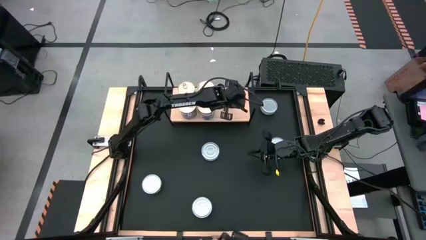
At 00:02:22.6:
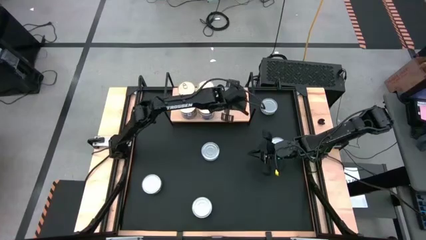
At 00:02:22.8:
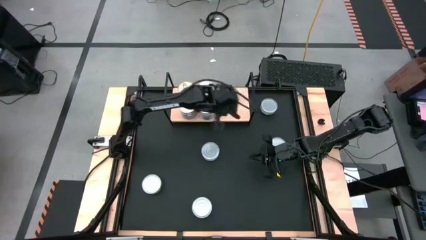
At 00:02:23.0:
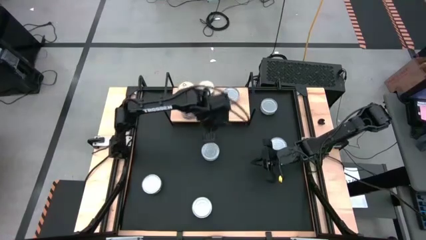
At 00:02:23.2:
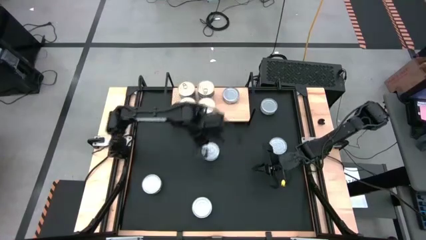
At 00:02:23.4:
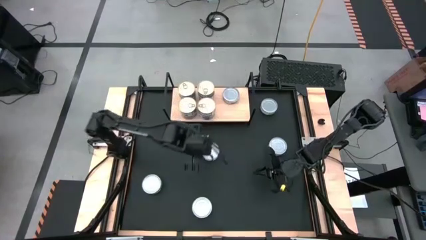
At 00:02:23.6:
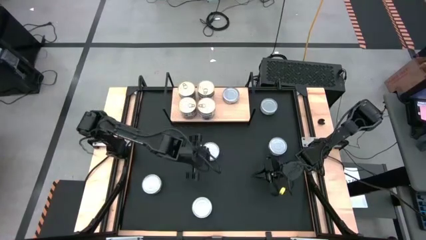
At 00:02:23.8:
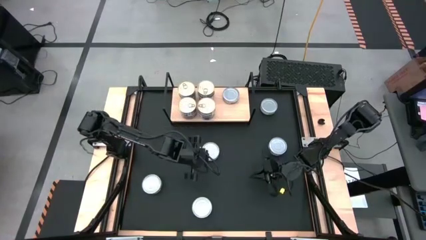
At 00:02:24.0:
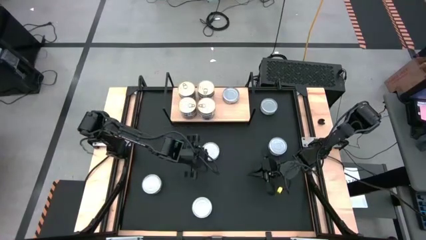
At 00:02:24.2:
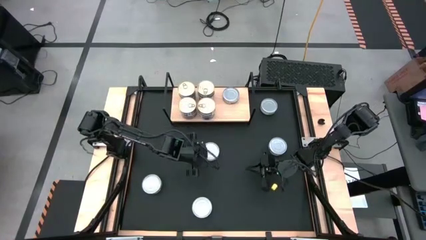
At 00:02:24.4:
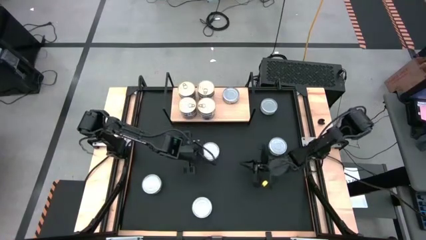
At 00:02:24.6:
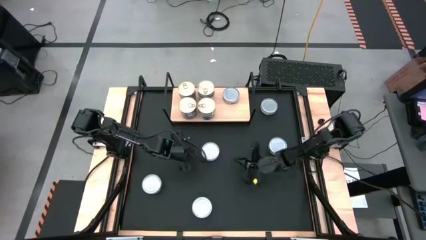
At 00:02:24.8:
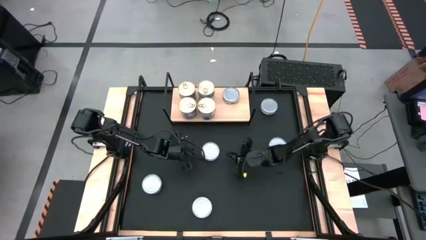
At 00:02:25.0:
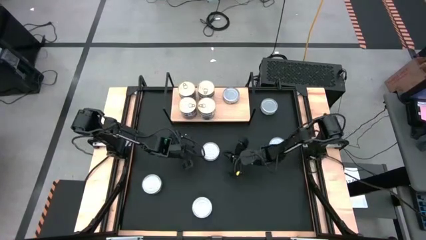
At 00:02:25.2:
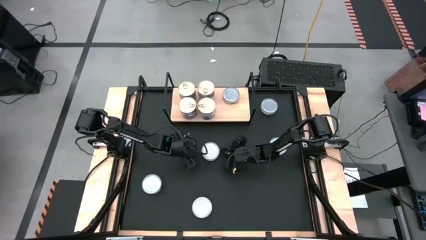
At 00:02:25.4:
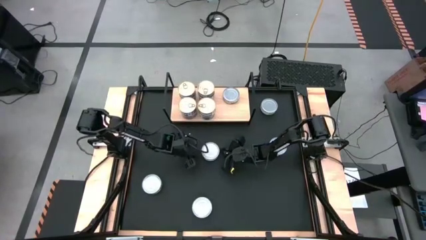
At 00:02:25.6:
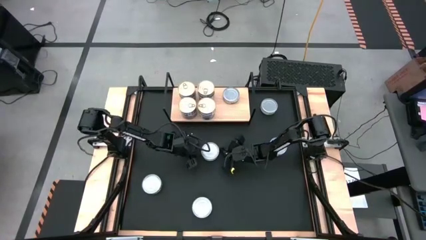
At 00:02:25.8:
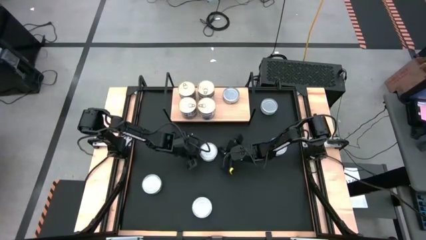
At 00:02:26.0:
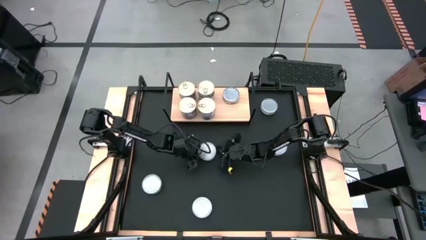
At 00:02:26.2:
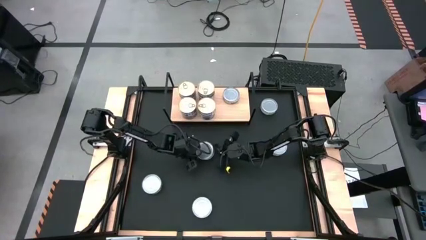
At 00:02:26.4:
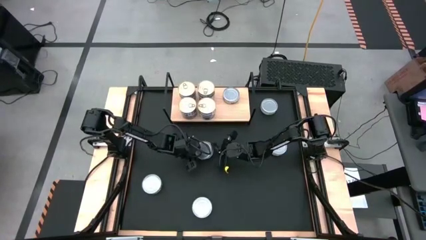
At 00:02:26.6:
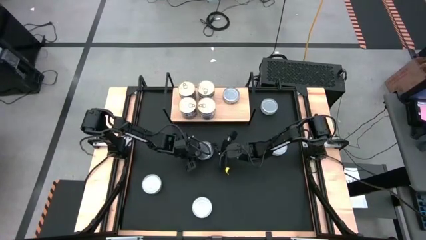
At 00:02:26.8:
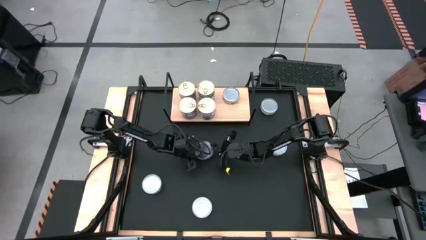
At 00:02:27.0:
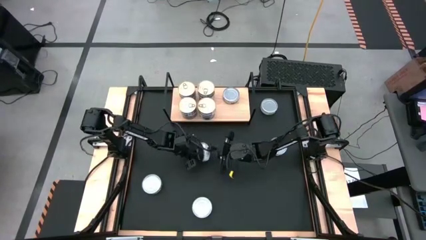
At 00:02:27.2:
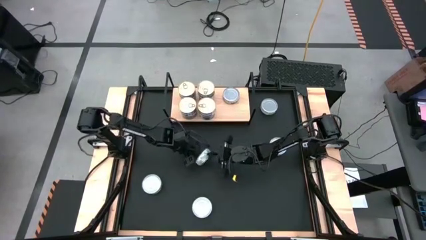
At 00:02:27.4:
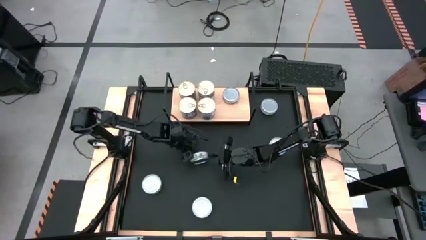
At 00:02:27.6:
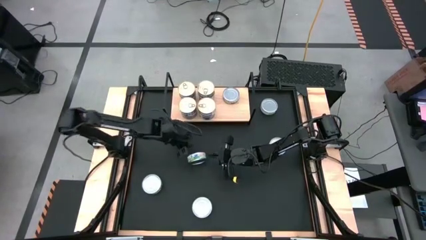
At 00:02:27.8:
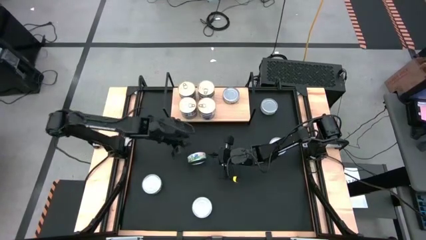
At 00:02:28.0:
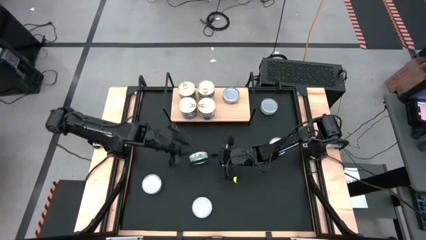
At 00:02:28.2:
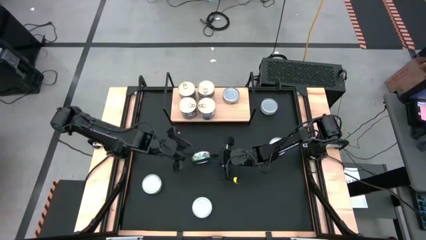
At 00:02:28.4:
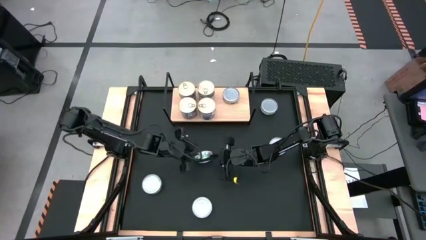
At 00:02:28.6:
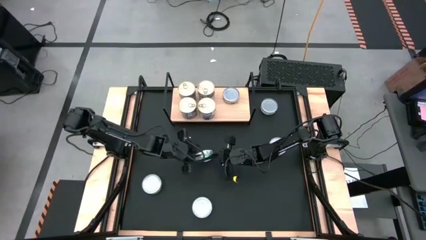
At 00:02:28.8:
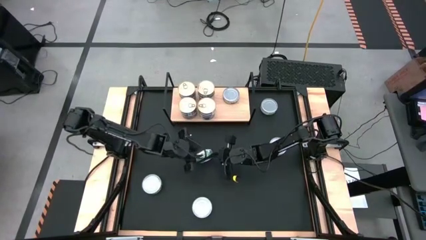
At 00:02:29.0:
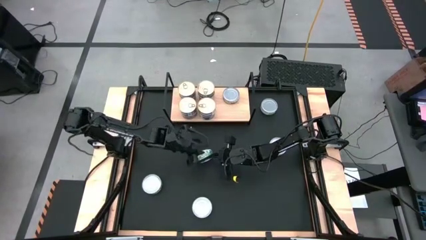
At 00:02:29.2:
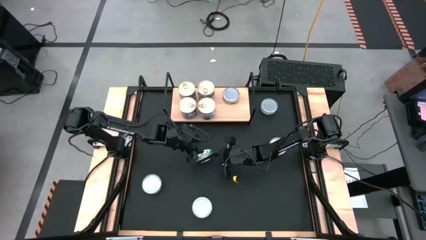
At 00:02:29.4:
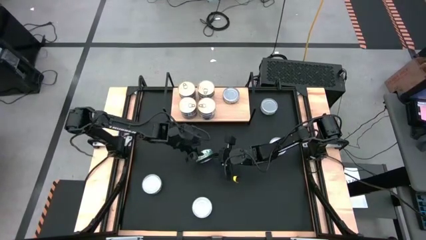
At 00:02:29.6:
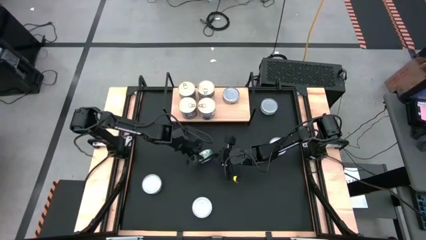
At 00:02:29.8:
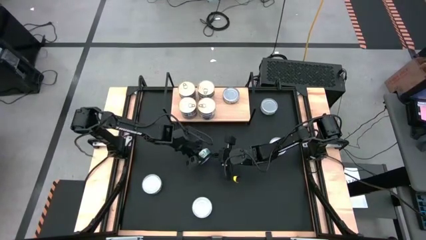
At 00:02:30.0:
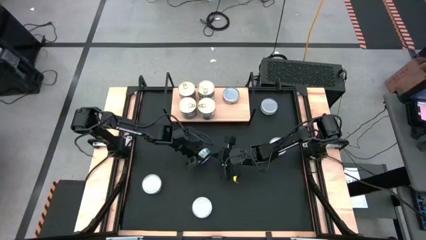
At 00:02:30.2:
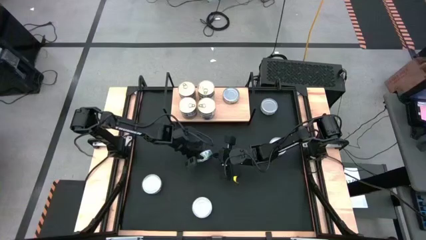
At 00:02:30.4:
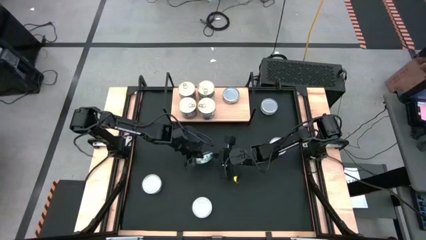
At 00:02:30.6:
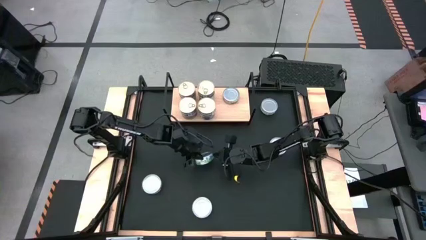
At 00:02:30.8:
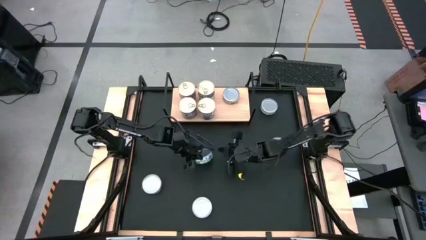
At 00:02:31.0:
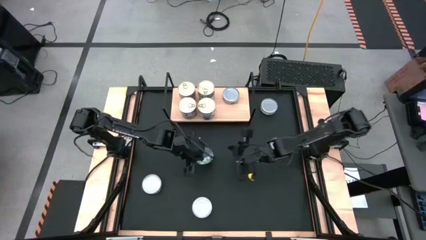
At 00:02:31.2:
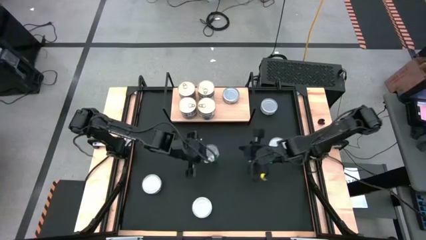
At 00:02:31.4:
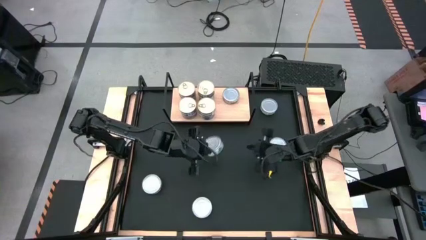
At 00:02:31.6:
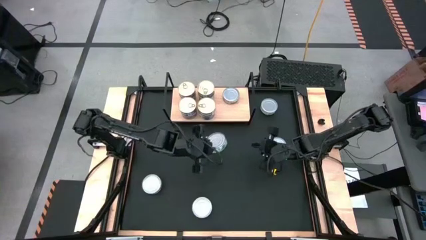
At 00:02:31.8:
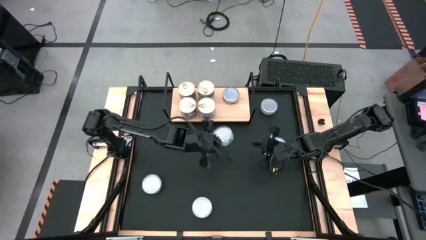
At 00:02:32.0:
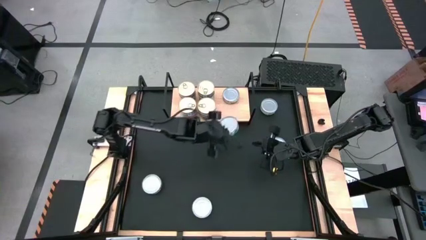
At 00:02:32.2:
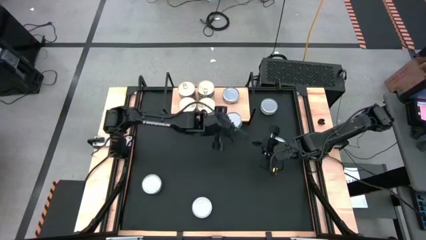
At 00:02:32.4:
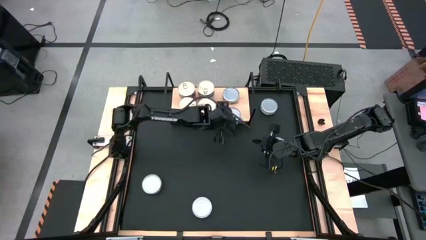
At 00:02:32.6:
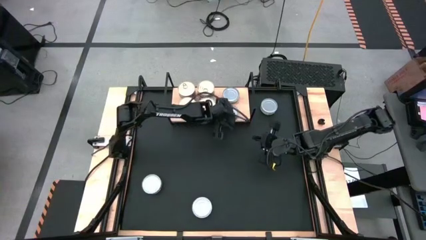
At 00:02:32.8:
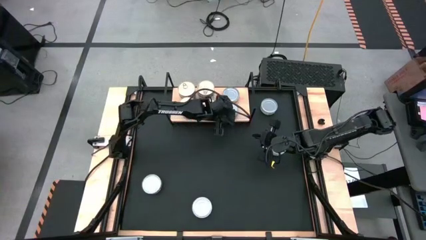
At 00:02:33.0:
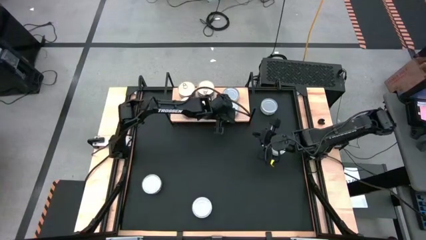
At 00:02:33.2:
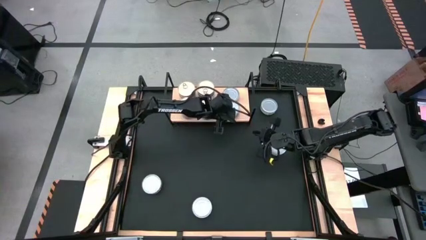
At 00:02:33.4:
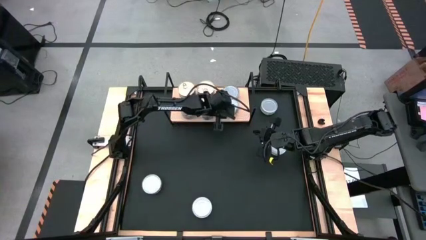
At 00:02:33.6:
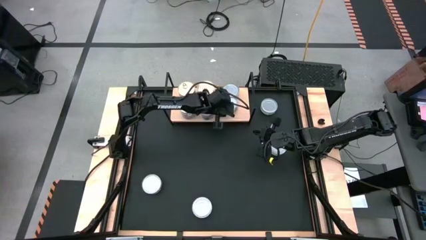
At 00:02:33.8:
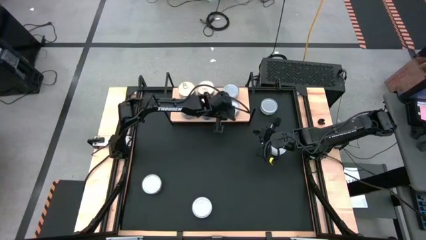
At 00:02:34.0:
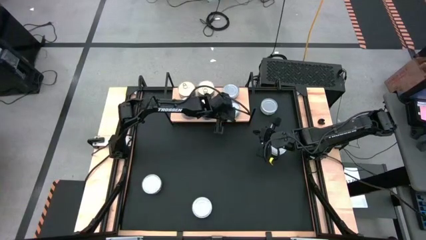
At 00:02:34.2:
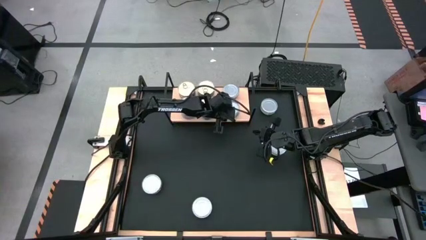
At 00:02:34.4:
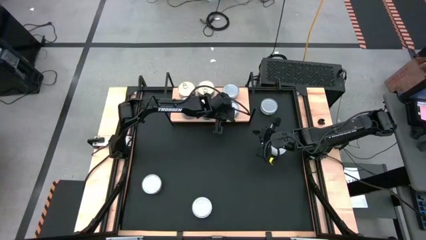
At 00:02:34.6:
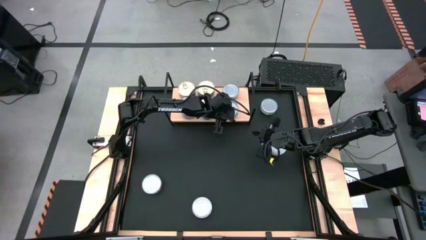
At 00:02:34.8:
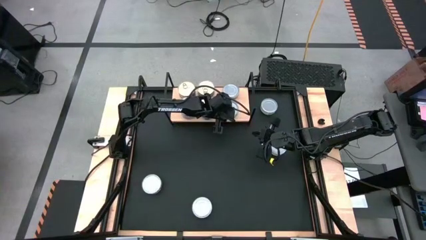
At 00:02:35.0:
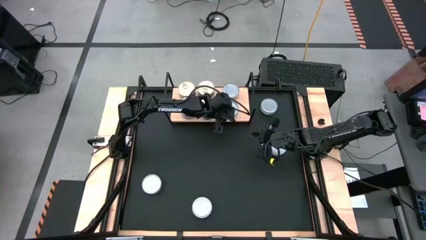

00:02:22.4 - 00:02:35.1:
Task: Stack canned seafood by type on shelf
Put the green tuna can on the shelf

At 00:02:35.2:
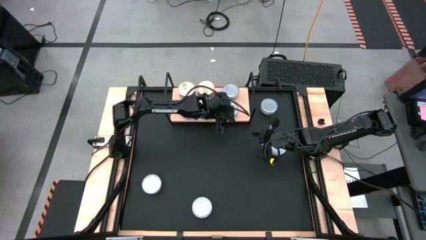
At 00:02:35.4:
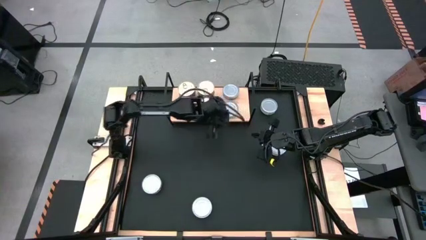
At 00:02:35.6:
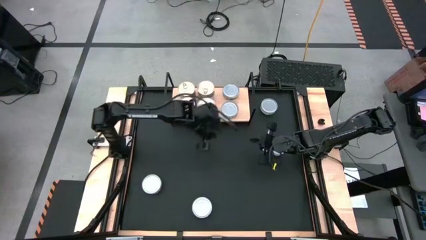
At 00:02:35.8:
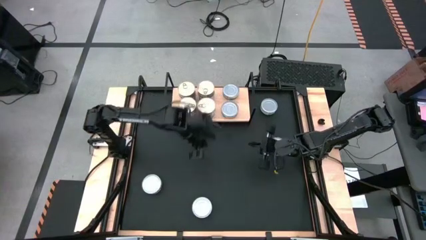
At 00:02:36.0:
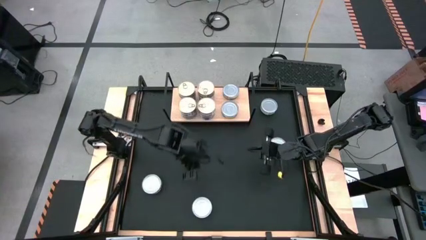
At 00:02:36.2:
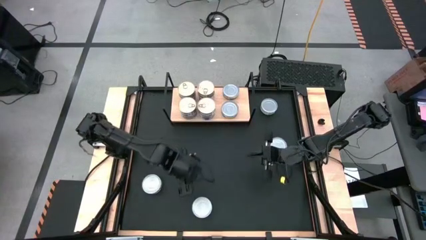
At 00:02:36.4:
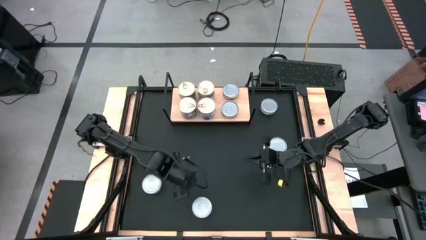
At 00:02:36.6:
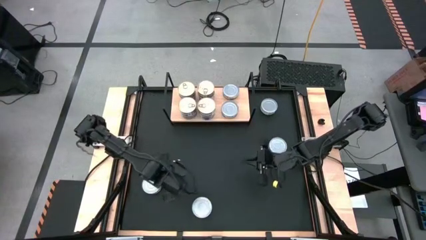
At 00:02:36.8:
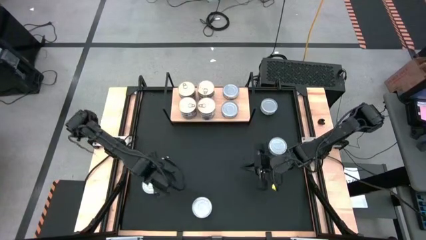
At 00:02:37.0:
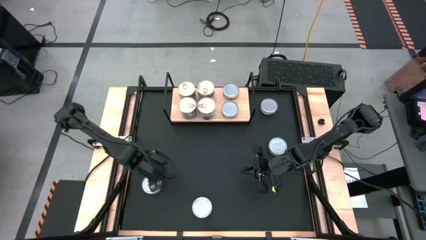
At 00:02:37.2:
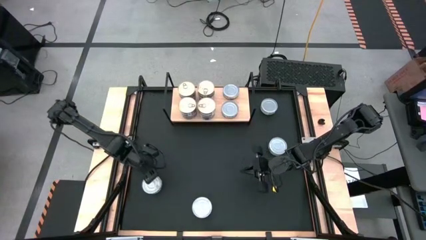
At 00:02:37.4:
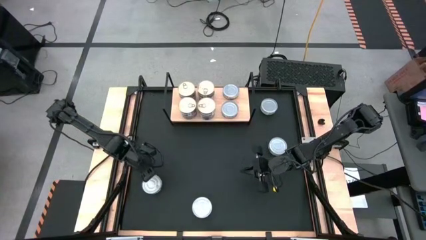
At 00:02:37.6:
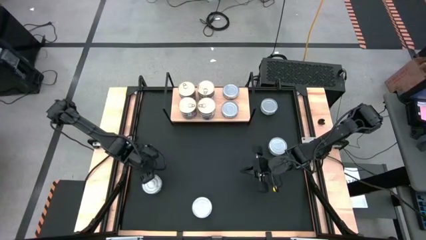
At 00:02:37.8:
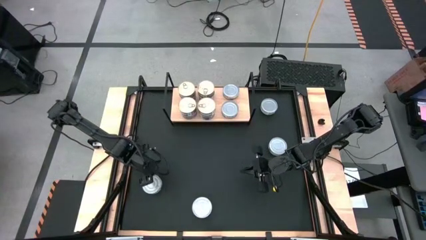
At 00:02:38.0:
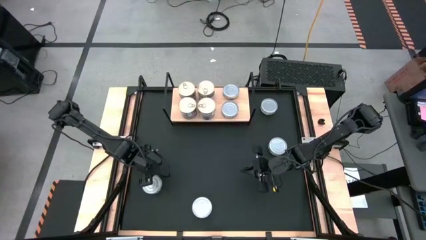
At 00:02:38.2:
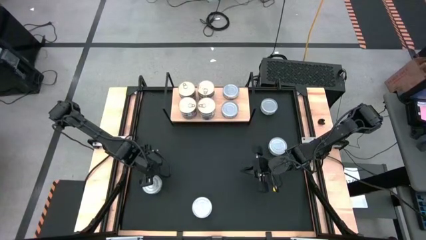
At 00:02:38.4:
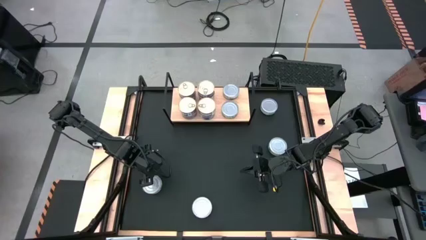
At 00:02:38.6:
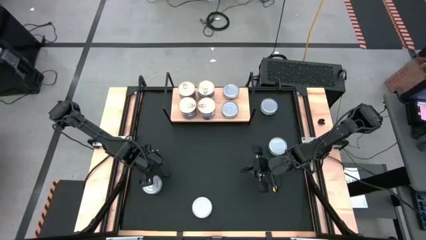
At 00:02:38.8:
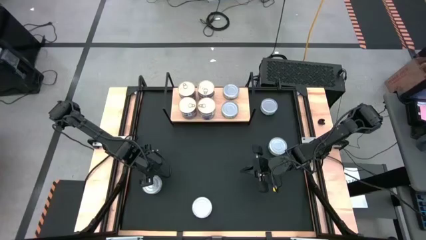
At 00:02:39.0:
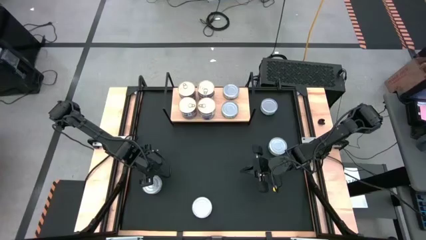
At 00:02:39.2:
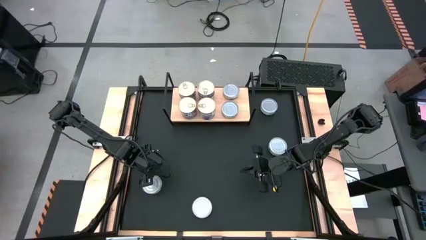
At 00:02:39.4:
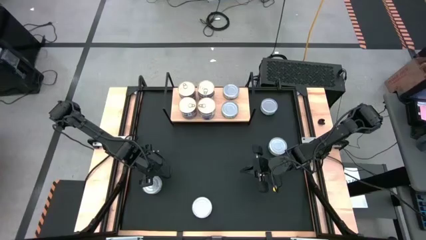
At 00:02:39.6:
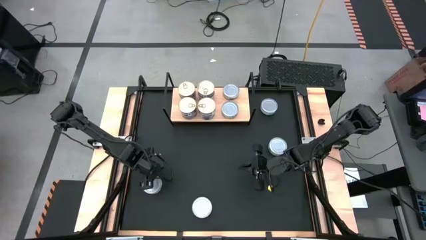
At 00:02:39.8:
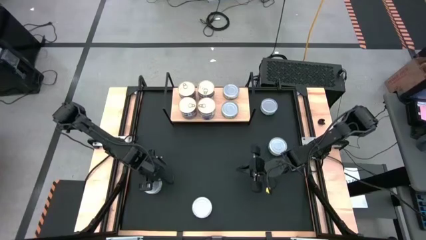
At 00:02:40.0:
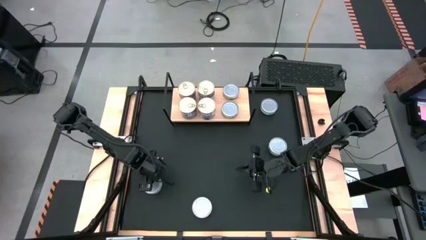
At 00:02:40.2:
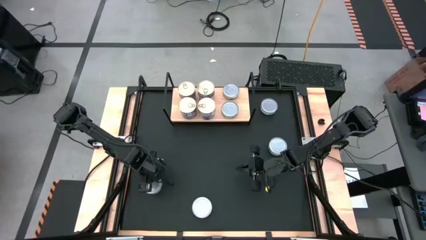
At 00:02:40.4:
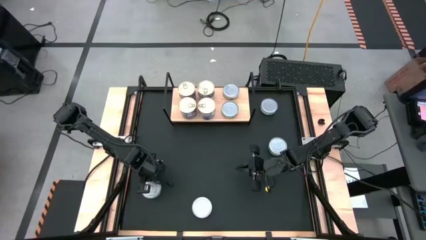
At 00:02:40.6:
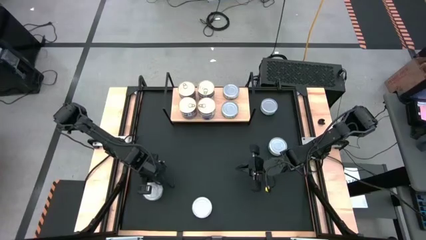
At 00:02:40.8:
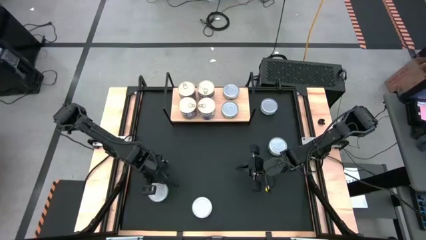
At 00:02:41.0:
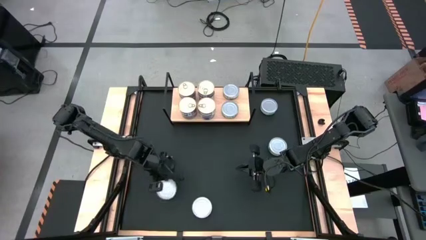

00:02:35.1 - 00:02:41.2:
Stack the green tuna can on top of the green tuna can on the shelf
